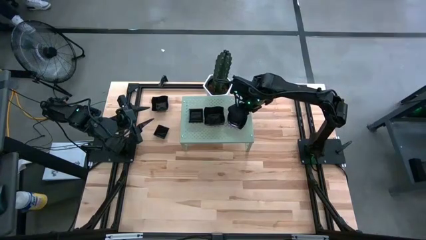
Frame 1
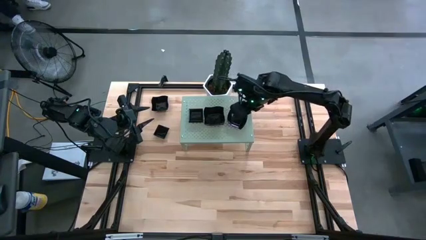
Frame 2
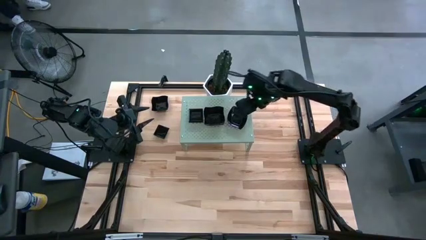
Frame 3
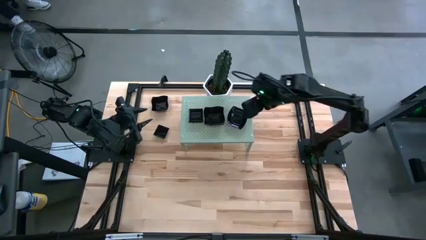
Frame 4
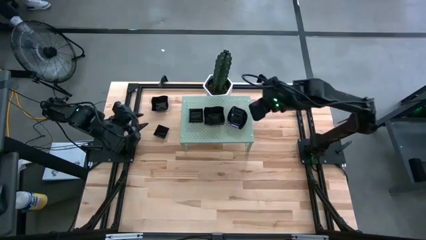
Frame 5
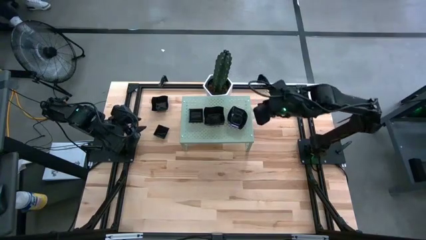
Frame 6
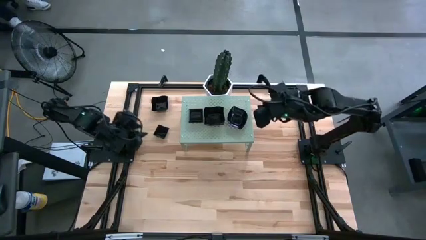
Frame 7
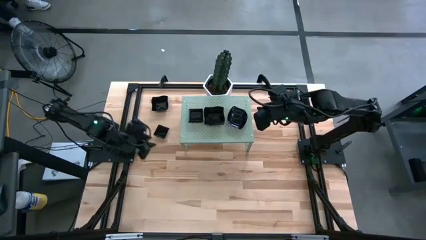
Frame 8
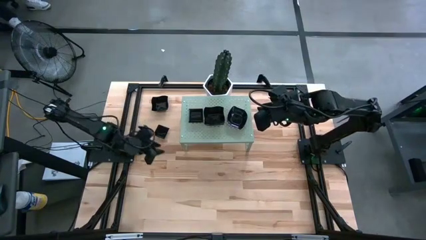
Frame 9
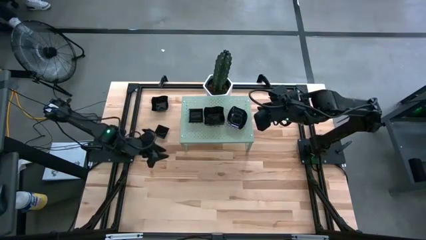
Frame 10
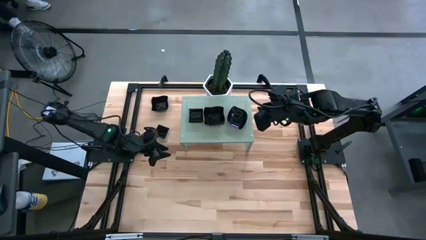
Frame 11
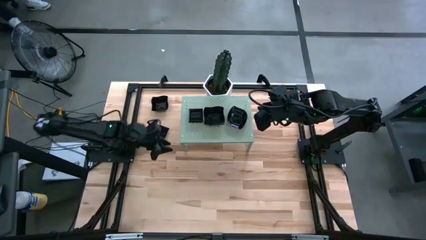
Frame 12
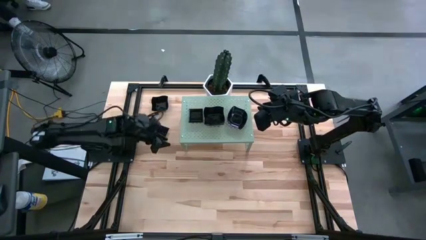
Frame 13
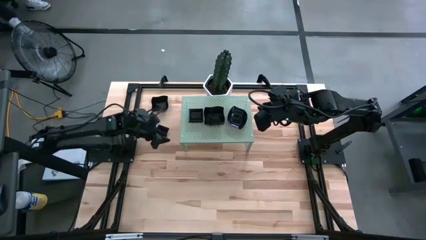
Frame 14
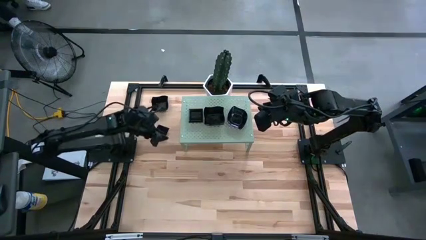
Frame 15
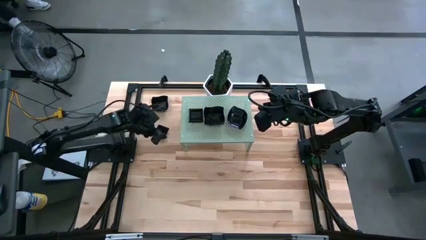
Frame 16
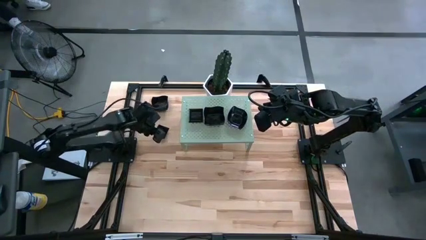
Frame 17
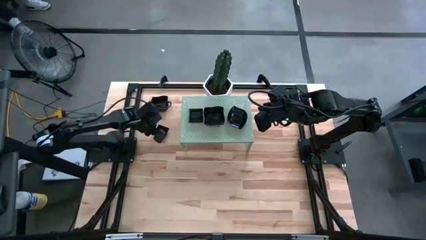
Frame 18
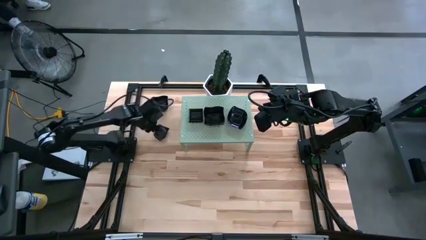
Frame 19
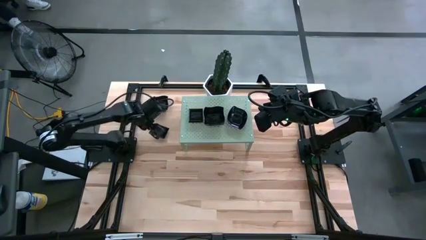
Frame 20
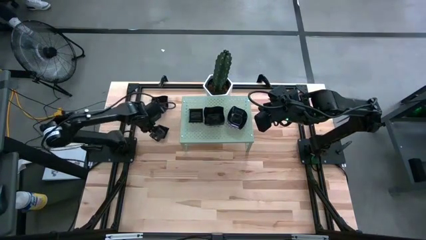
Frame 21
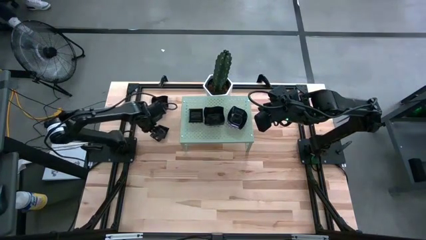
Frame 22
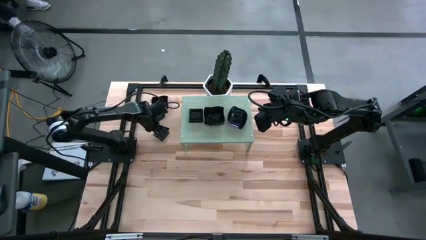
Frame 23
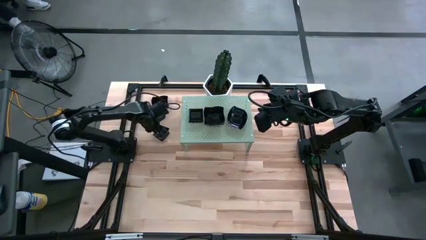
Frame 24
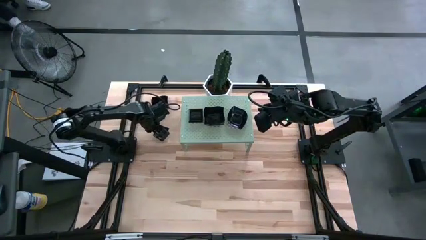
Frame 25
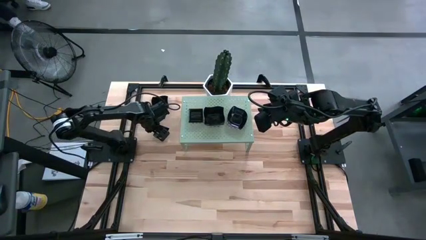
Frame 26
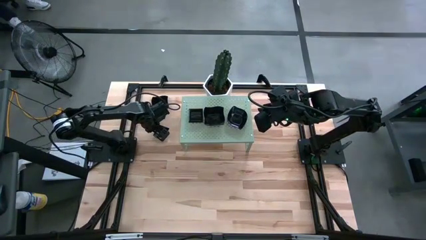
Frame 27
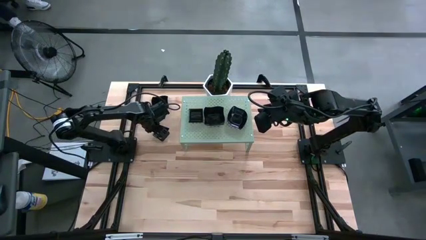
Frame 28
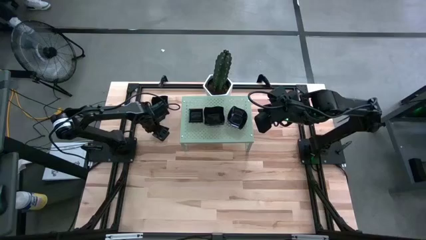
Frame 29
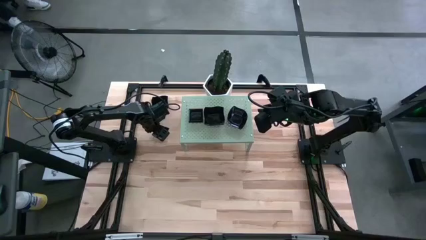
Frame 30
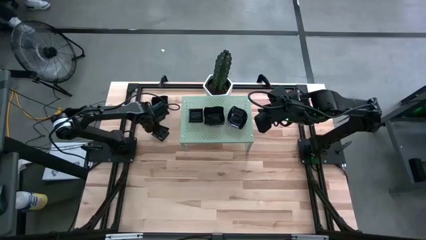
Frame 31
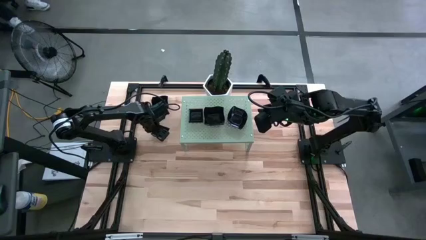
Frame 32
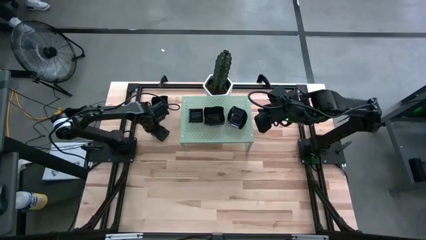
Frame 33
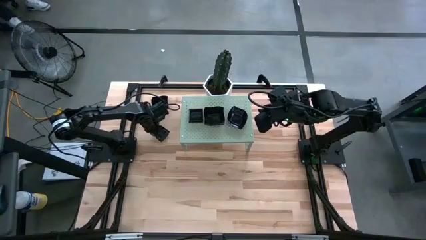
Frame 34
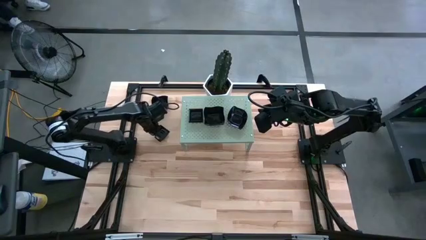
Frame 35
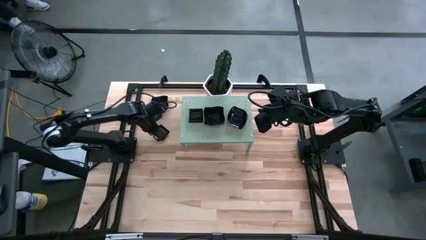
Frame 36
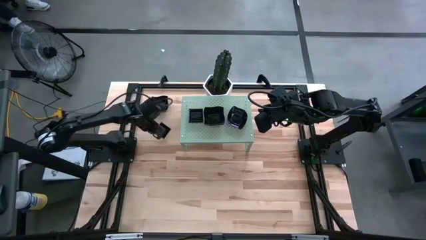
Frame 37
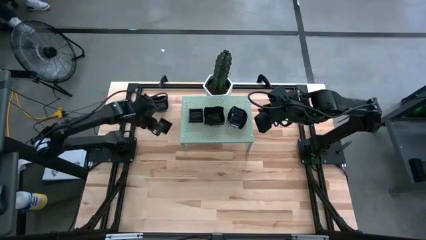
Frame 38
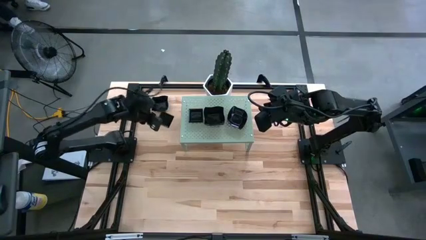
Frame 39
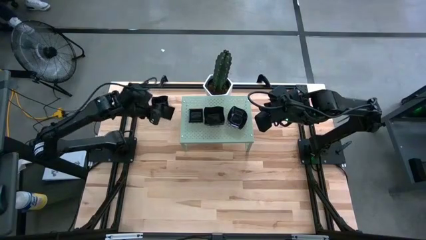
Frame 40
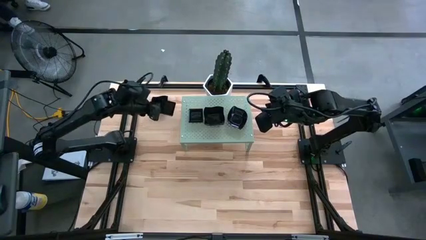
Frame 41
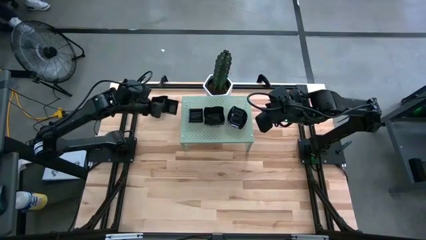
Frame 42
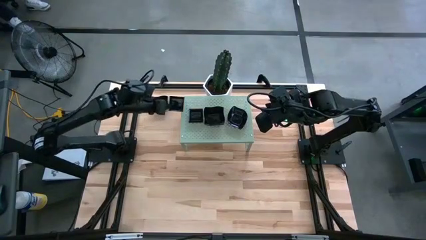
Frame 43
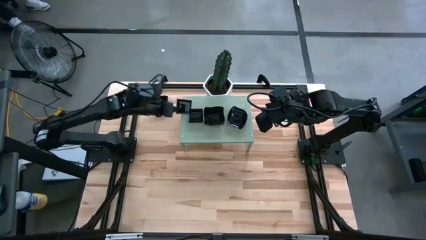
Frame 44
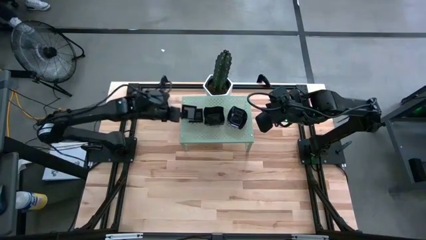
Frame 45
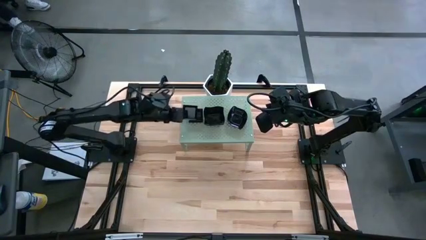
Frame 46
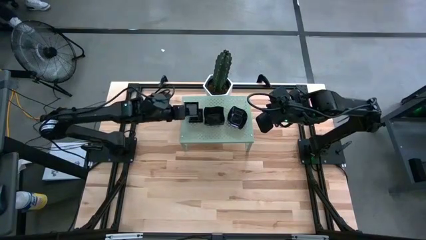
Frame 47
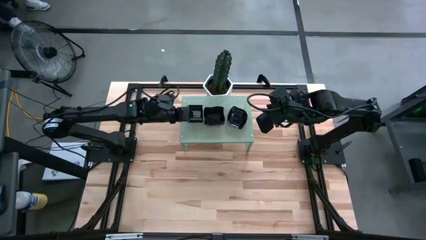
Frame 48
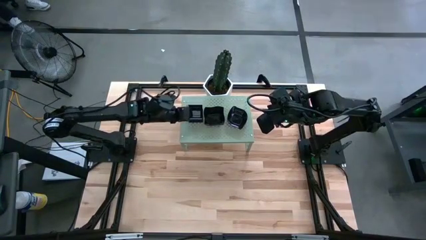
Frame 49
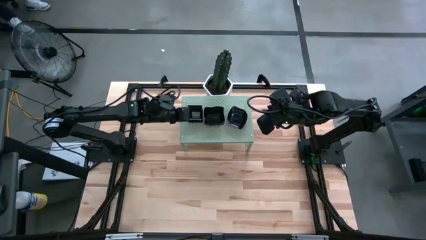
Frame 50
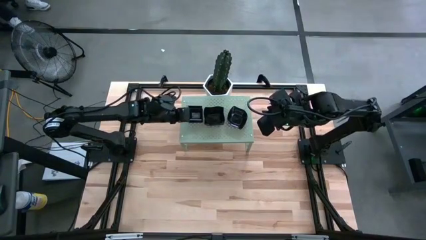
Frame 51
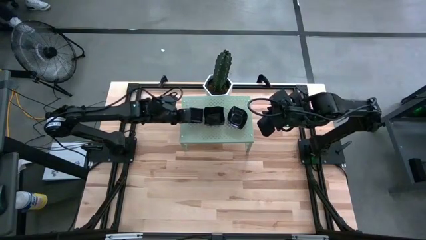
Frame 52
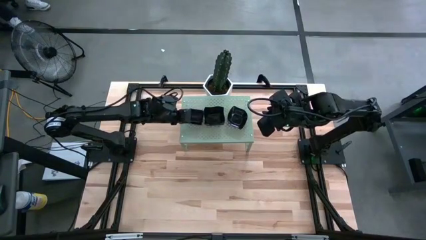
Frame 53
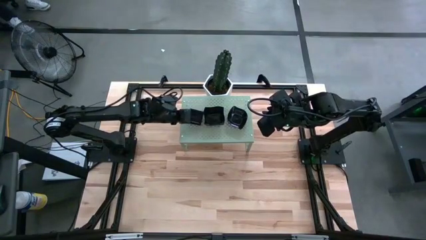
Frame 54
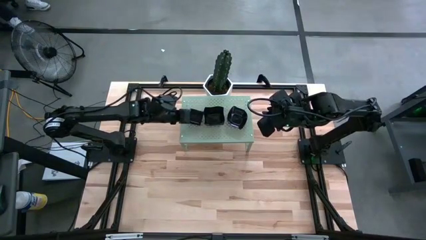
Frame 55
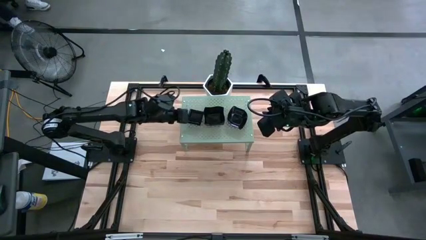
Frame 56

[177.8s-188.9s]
Task: Pick & Place Mini shaped plates
Stack the square plate on top of the square plates on the shelf

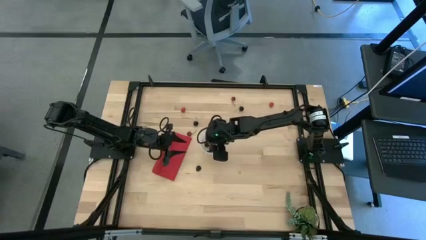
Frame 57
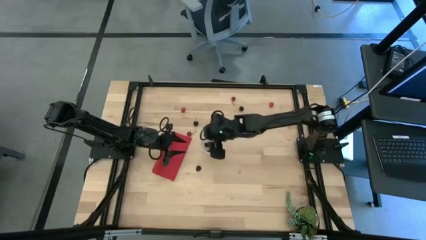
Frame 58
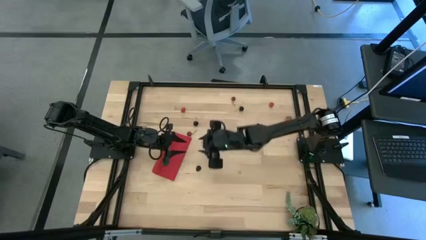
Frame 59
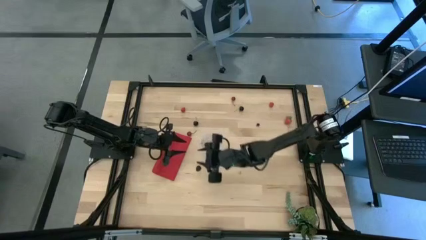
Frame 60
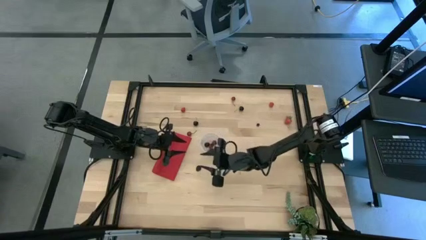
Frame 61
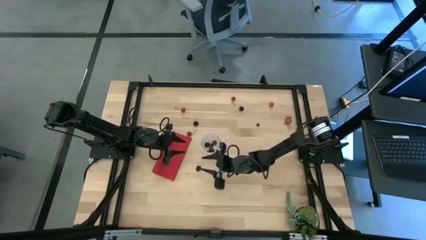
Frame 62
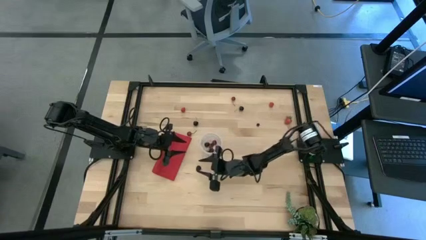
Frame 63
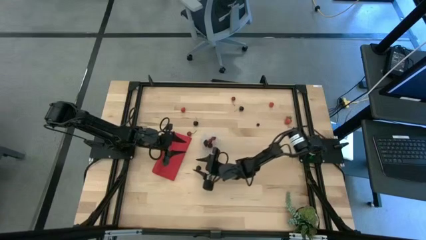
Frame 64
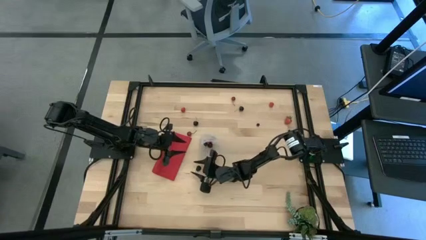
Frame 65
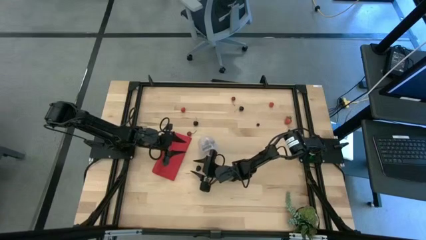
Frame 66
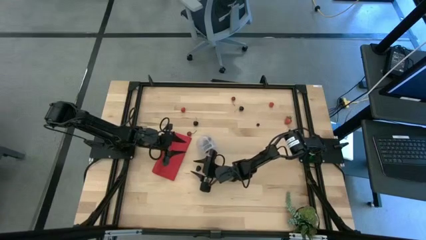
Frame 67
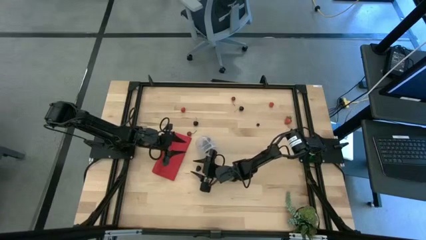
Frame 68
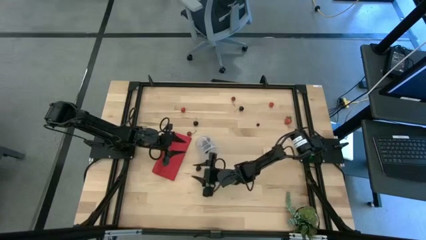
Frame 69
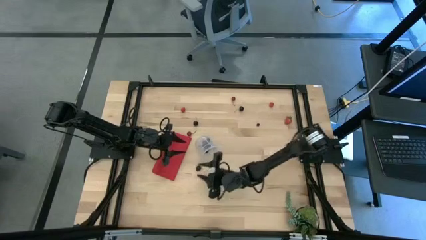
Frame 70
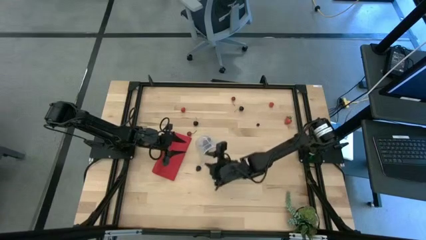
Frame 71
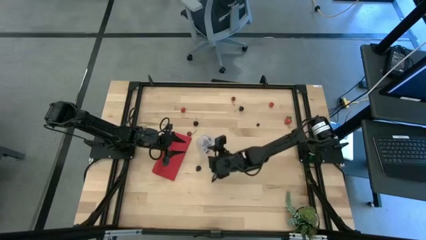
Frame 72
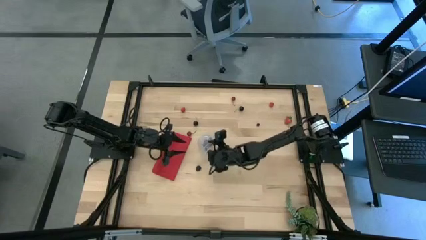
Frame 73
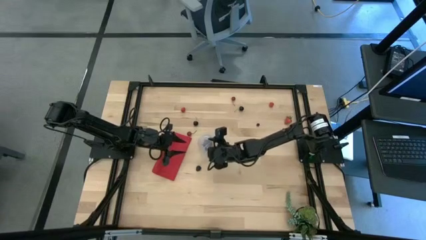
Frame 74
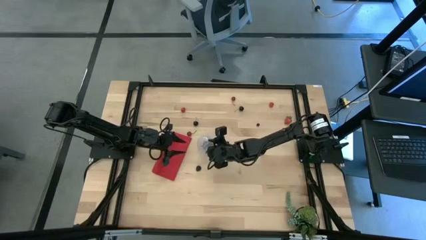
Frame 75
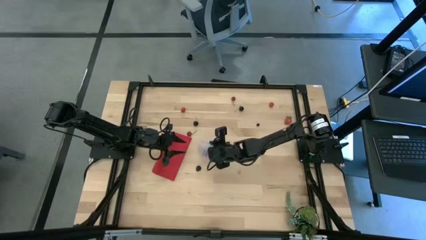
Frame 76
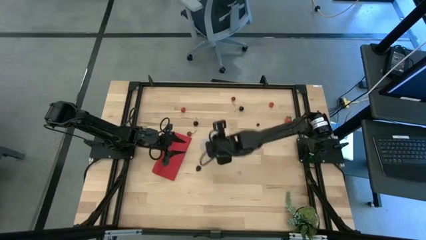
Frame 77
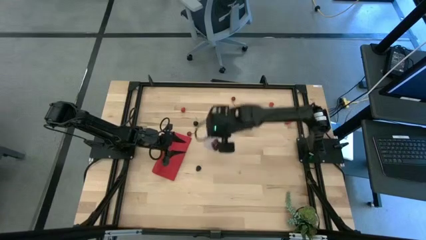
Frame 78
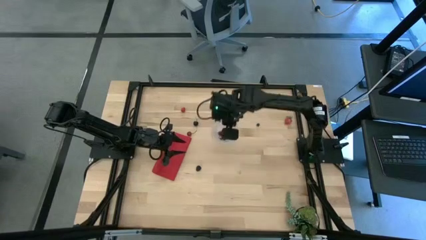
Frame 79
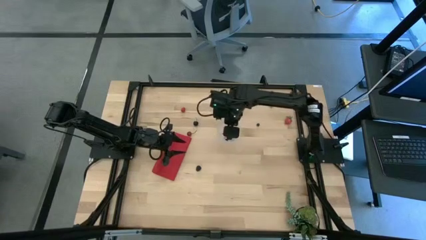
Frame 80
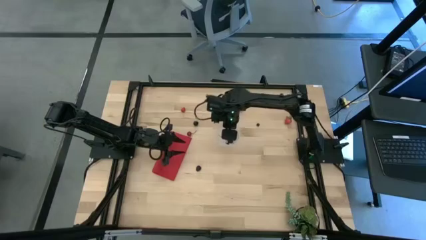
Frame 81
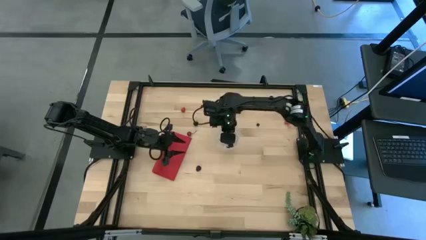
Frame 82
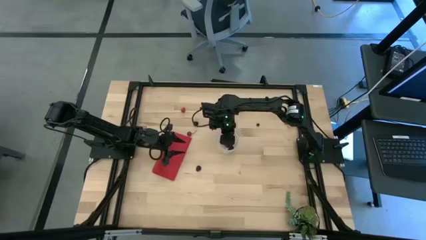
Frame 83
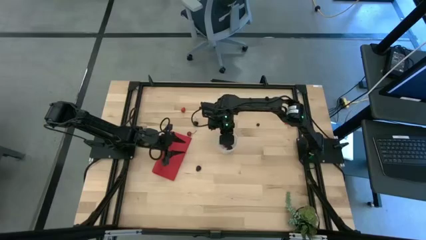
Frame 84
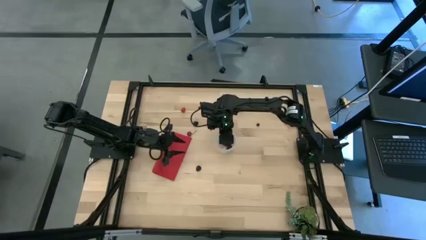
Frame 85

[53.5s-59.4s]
Task: Pick and placing Produce into tupperware
Adjust the transparent bin
